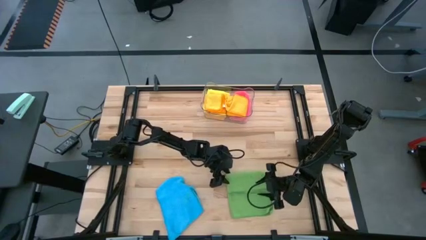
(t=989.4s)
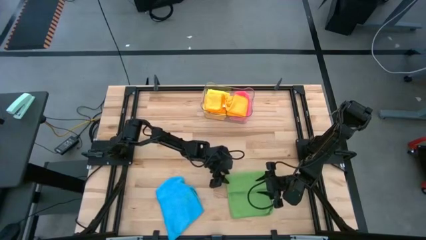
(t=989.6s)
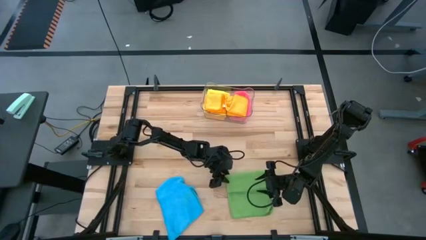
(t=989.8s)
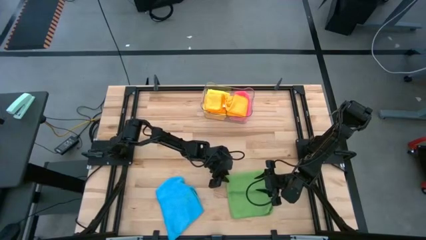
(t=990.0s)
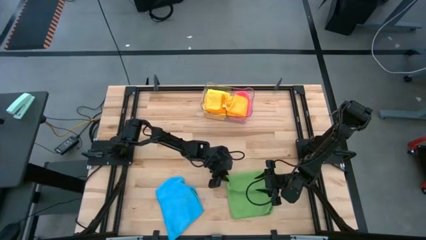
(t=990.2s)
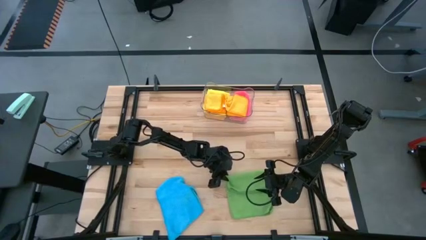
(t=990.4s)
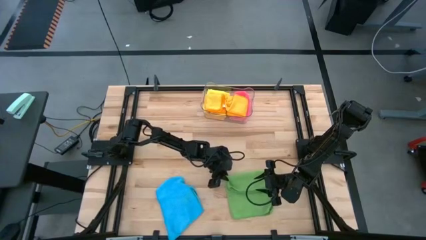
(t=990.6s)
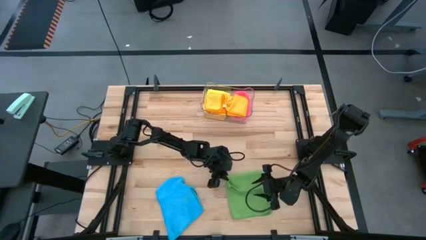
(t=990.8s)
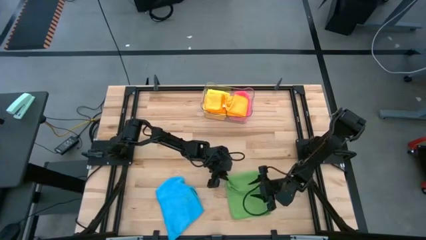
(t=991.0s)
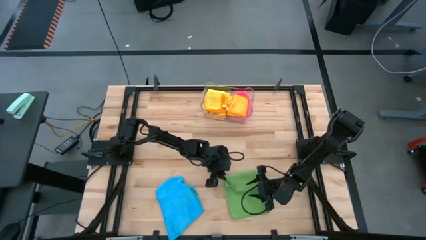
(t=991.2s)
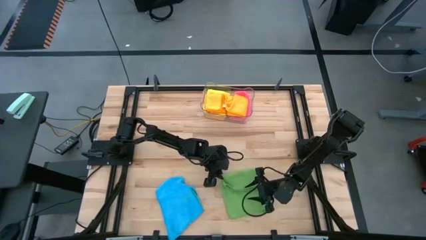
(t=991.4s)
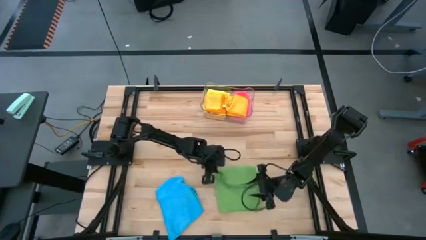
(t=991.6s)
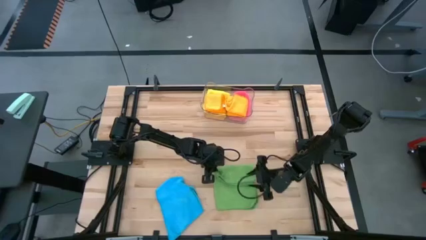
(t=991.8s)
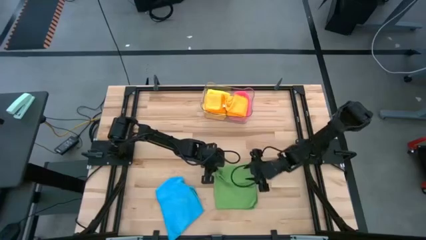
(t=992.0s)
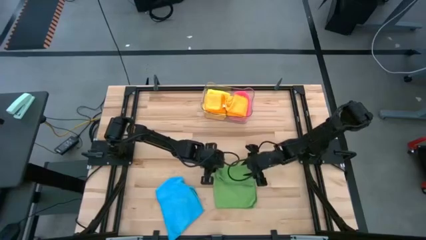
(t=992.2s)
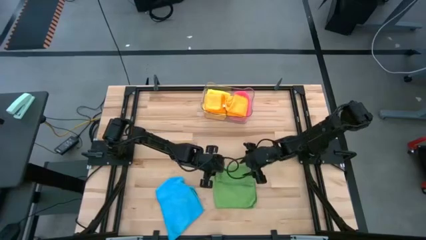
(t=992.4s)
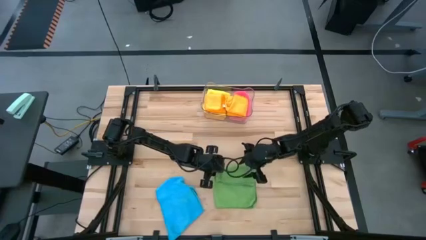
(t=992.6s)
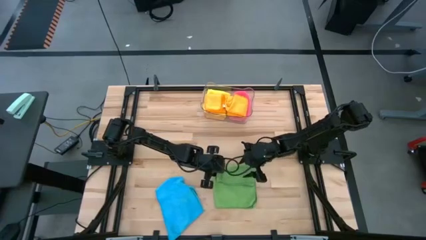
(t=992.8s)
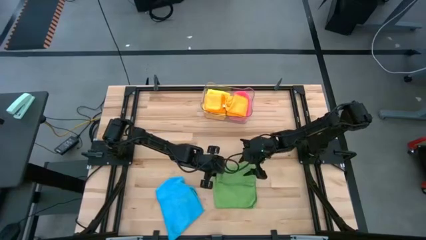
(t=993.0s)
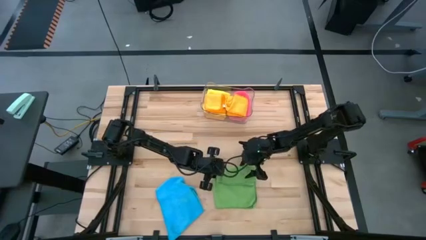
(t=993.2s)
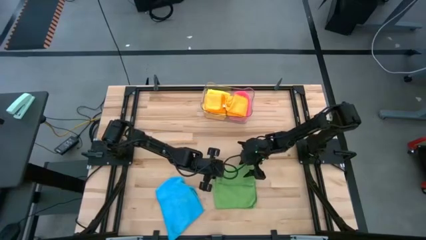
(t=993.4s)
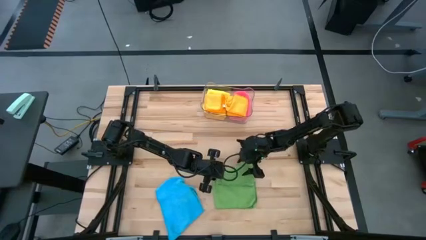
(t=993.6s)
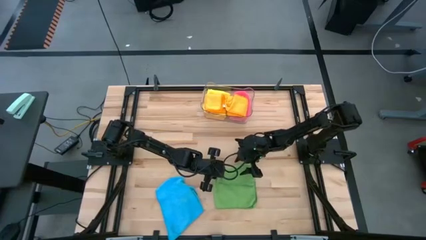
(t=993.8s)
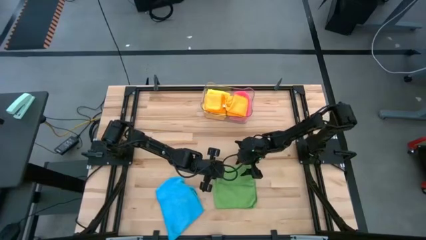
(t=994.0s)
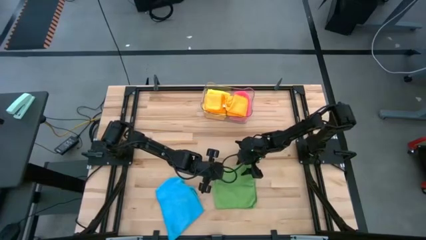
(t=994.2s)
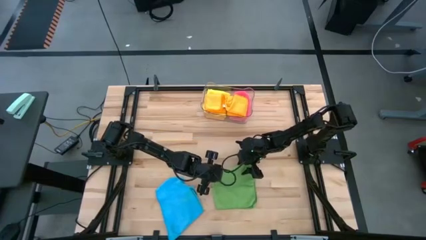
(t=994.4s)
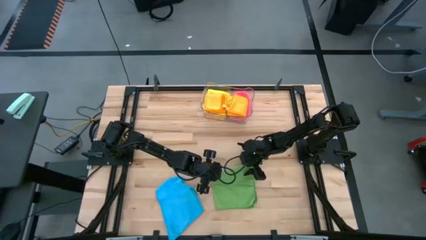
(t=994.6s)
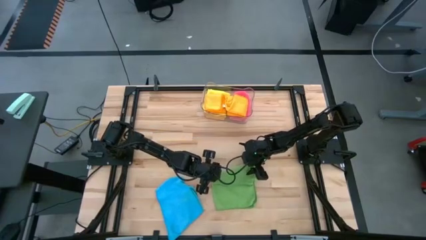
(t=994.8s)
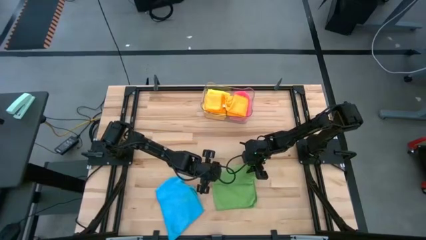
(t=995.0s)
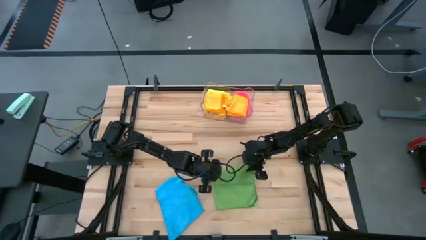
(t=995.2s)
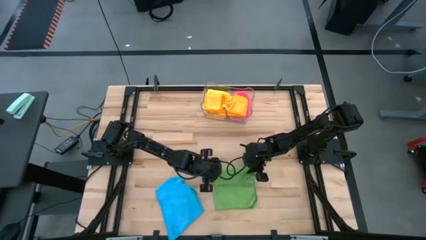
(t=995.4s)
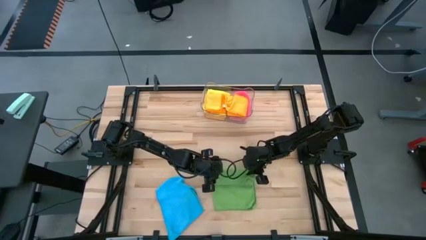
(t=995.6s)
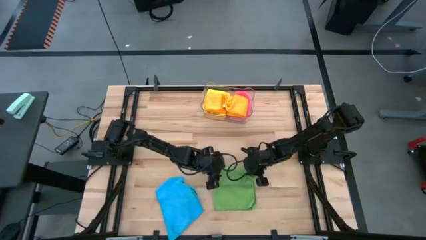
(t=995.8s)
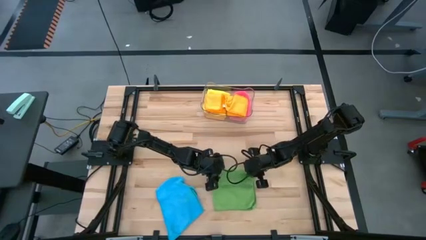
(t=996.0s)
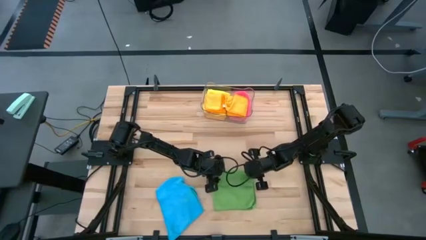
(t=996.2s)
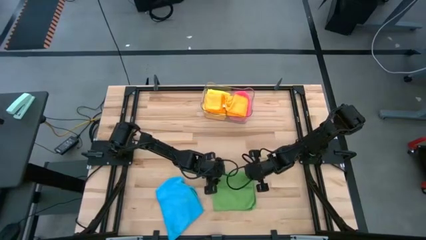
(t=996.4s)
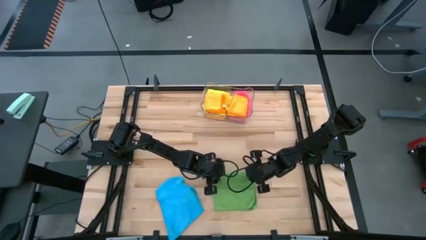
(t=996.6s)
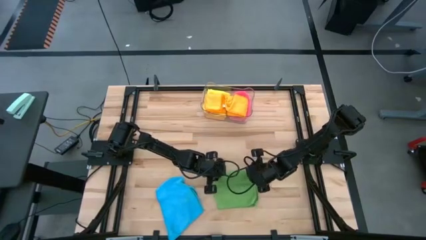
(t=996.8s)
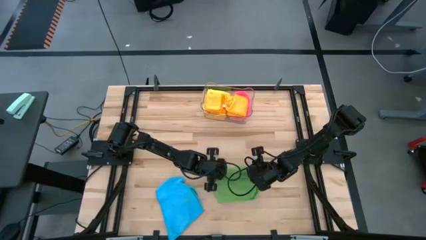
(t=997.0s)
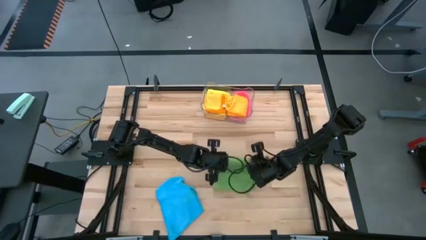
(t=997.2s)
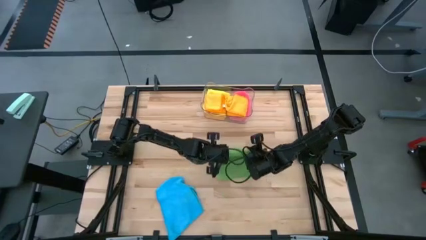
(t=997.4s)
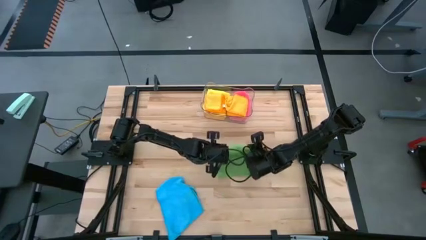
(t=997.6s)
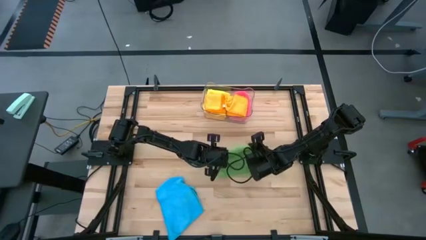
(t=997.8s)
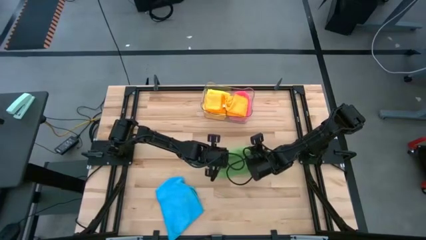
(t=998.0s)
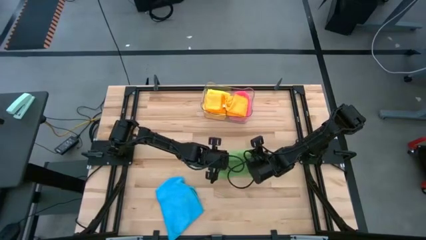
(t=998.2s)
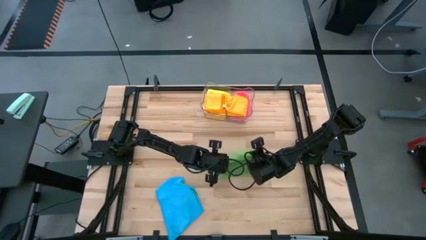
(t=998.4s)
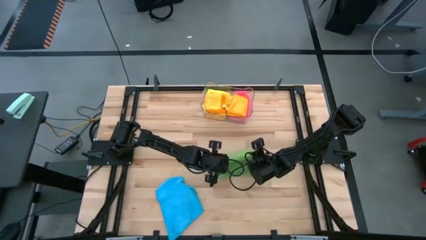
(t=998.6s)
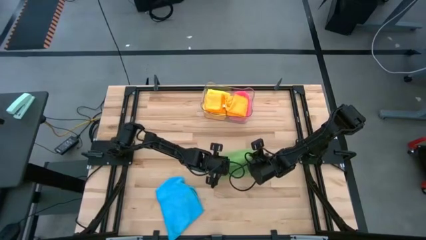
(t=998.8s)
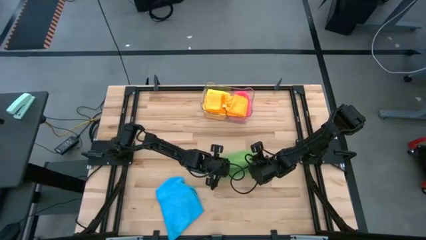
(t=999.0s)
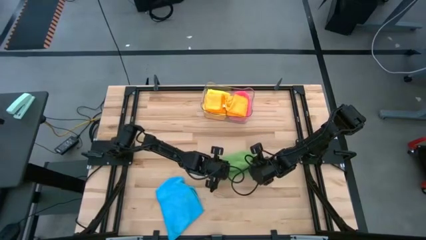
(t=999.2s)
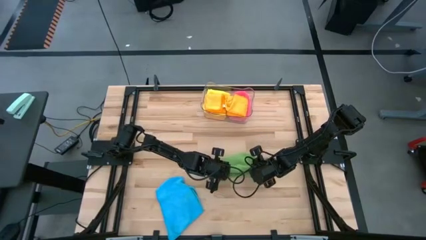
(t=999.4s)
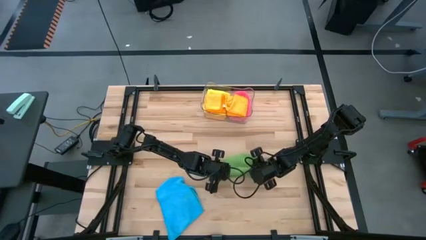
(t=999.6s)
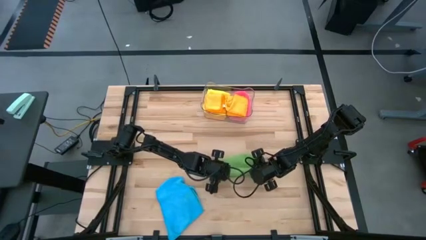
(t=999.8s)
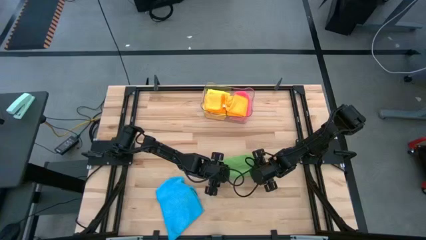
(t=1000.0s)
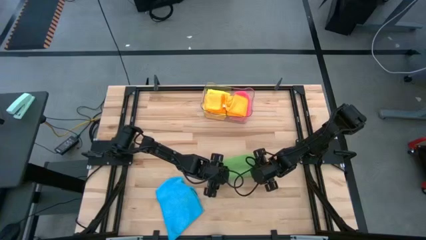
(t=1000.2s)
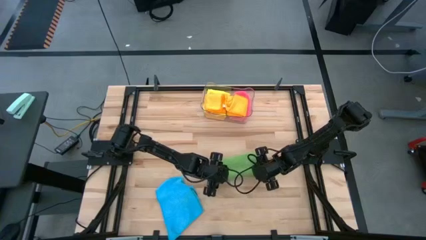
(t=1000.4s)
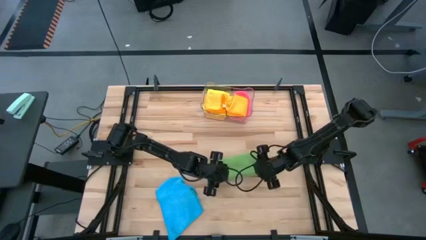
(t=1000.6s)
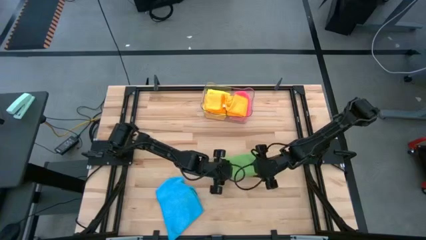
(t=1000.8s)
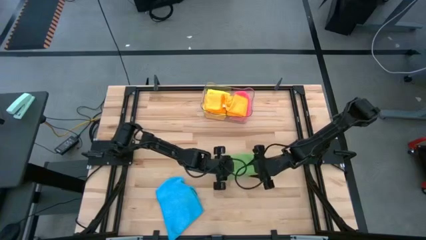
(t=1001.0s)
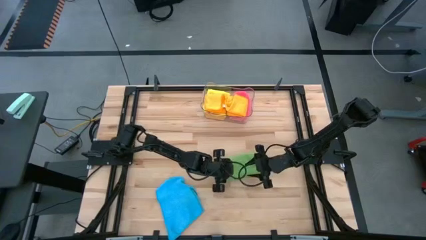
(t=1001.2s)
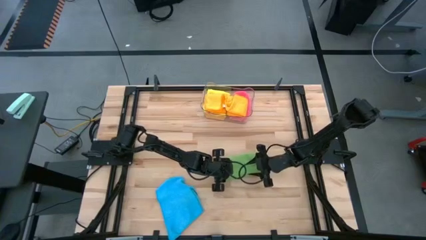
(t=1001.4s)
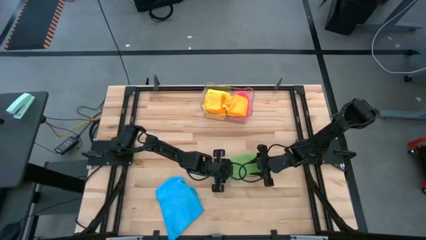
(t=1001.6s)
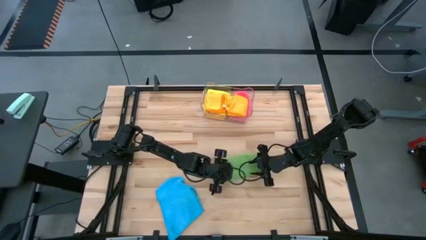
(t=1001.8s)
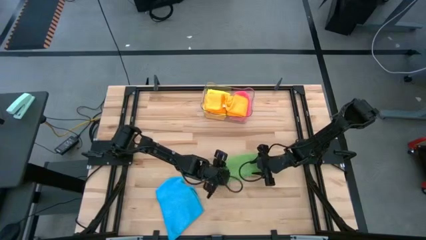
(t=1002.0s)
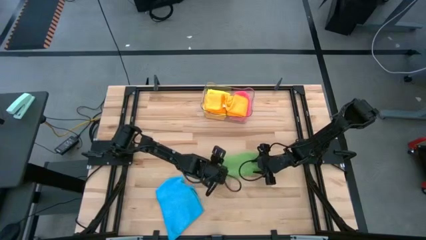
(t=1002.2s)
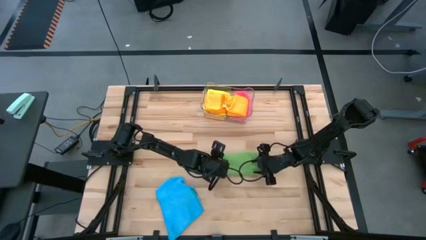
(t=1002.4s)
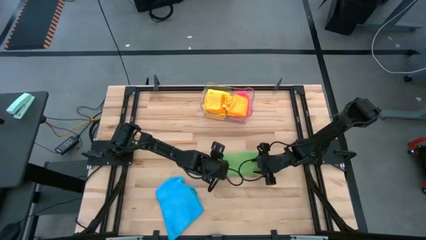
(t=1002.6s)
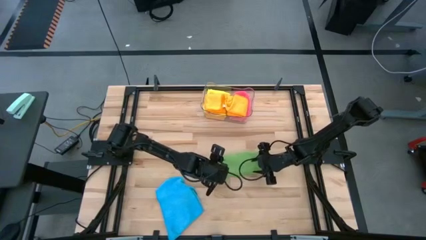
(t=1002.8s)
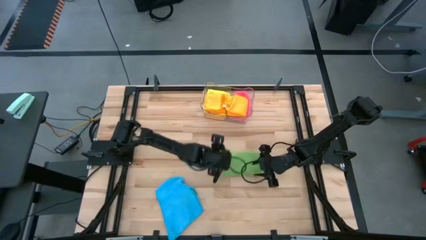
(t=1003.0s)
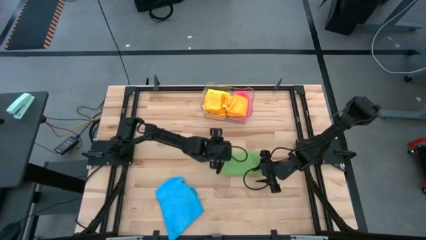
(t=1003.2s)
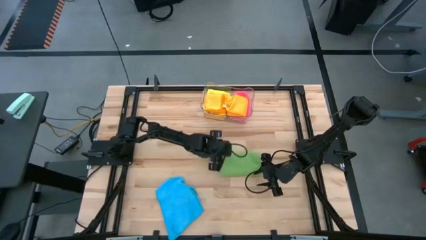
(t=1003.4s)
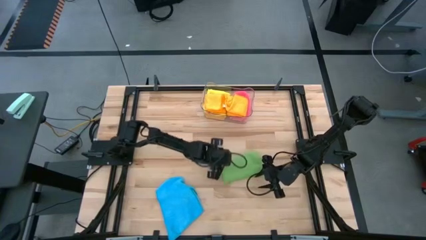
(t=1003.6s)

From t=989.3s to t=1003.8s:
Task: Fold microfiber towels
Fold the green microfiber cloth

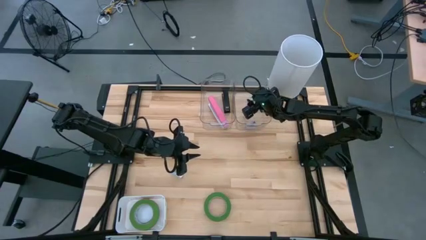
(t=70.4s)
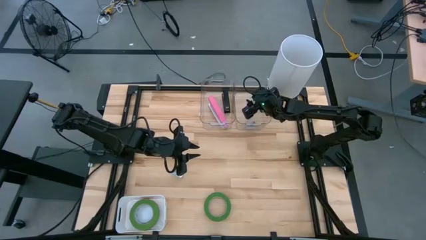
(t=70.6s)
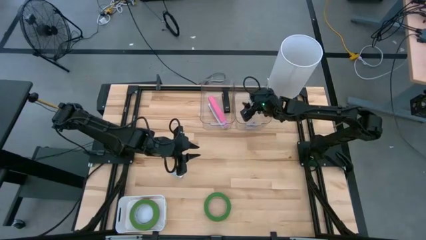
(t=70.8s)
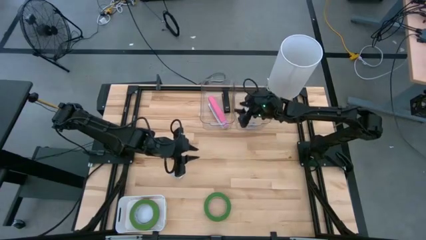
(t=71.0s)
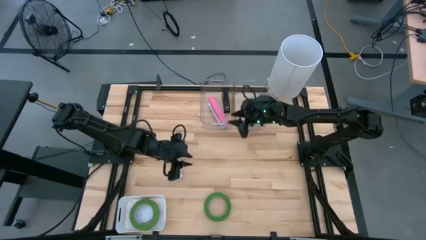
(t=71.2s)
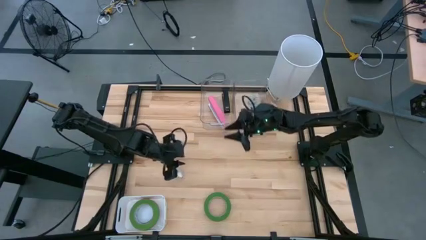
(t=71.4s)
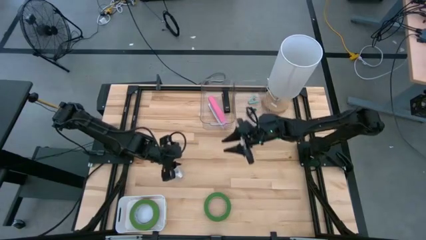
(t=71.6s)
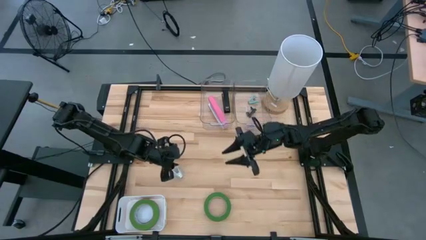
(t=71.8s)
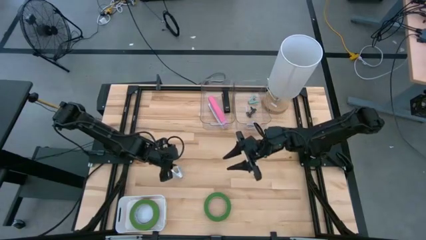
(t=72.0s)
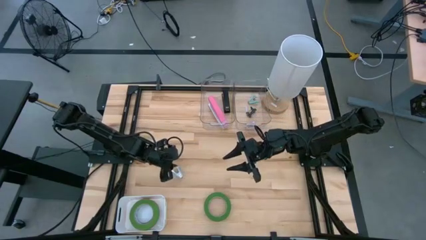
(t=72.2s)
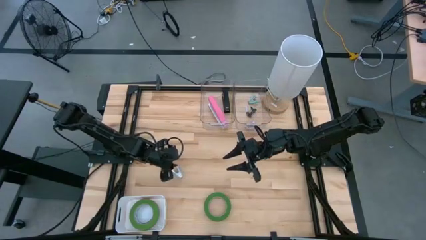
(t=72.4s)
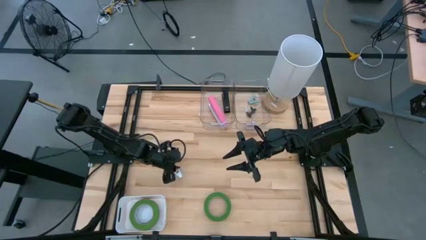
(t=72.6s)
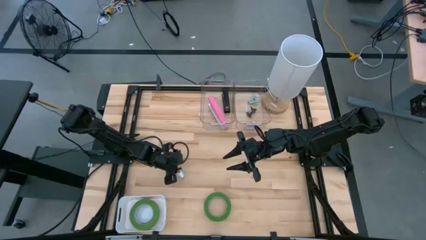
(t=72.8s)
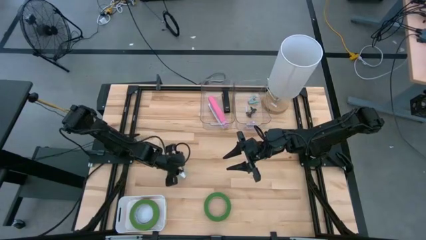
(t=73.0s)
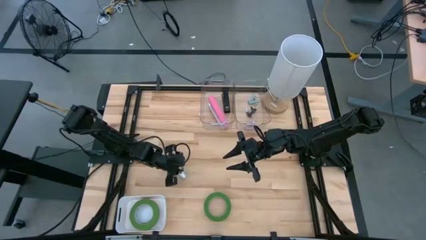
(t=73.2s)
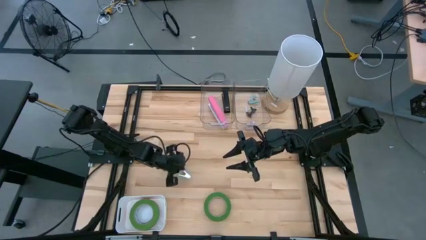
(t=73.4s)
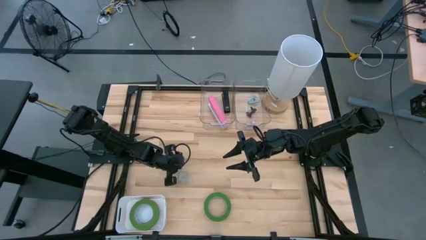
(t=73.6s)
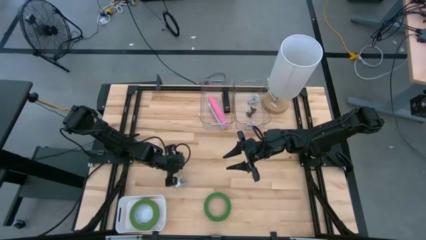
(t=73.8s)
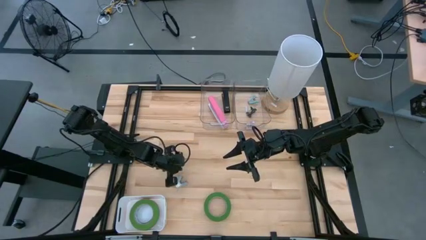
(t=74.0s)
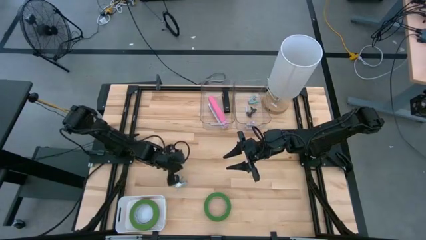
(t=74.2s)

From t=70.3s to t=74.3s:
Task: Pick and place Stapler, Stapler remover, tape
Put the blue staple remover into the right transparent bin
